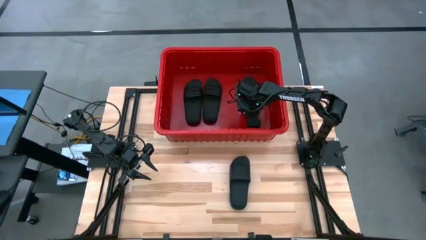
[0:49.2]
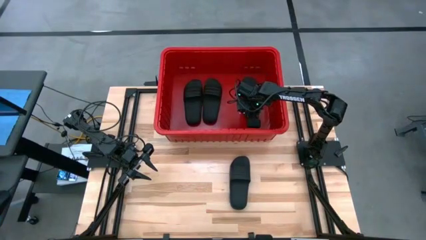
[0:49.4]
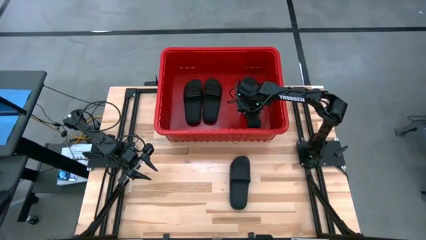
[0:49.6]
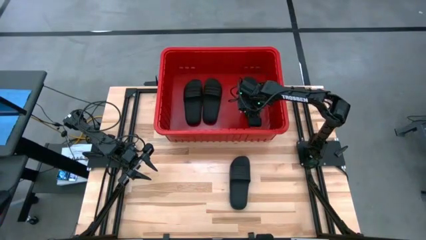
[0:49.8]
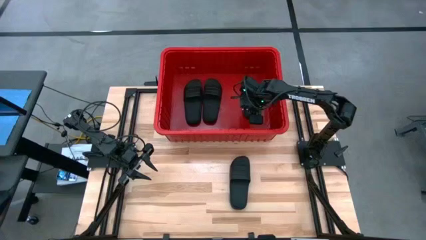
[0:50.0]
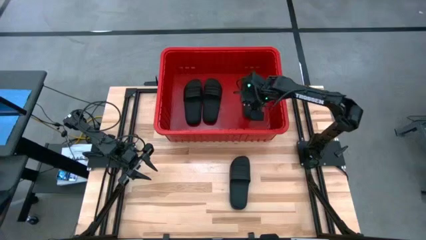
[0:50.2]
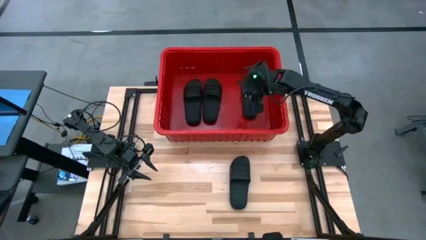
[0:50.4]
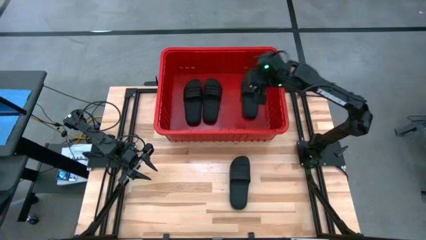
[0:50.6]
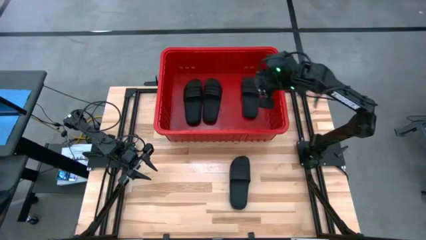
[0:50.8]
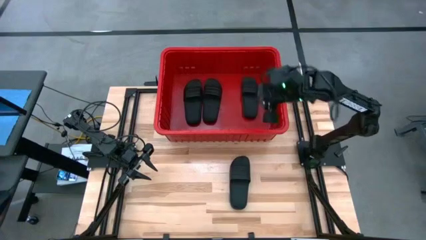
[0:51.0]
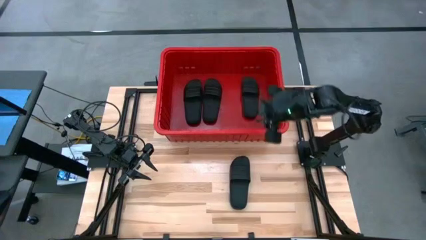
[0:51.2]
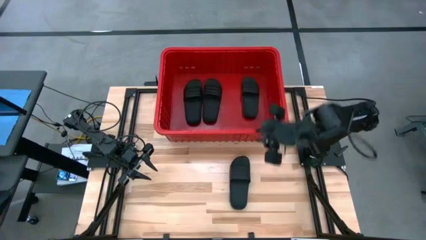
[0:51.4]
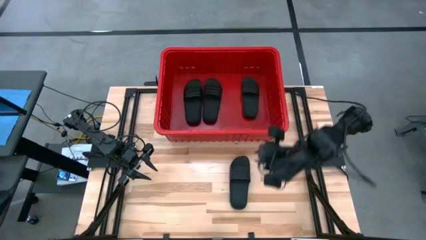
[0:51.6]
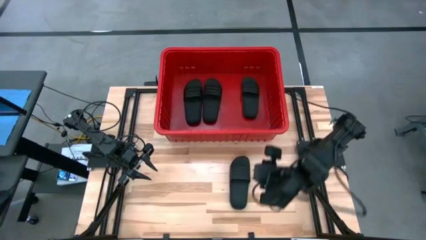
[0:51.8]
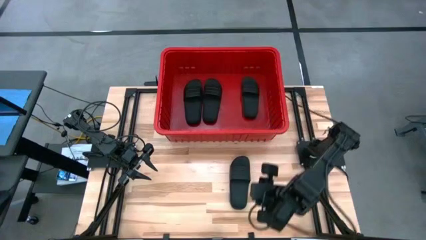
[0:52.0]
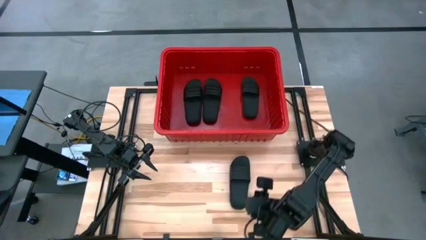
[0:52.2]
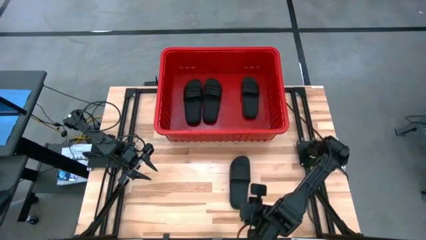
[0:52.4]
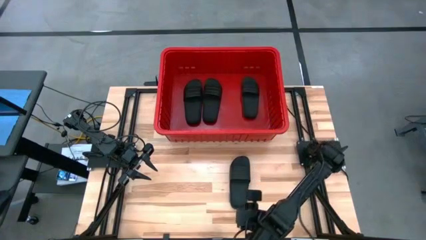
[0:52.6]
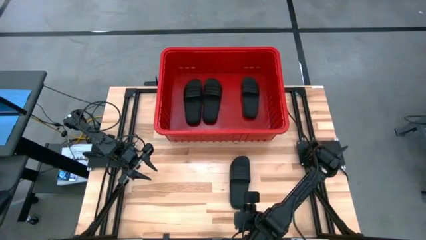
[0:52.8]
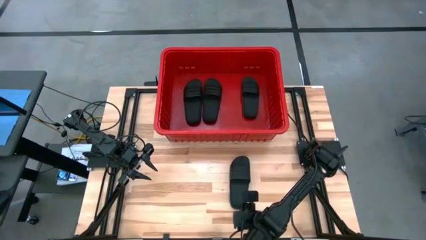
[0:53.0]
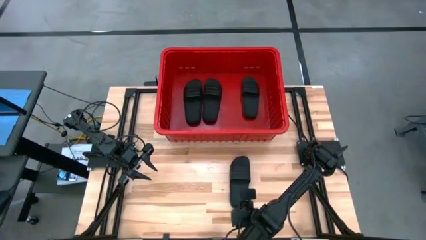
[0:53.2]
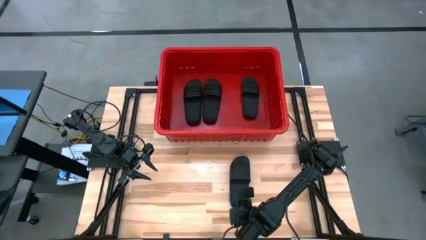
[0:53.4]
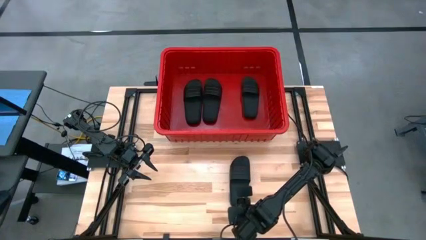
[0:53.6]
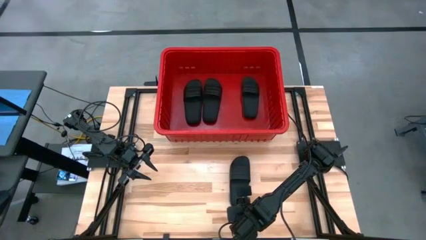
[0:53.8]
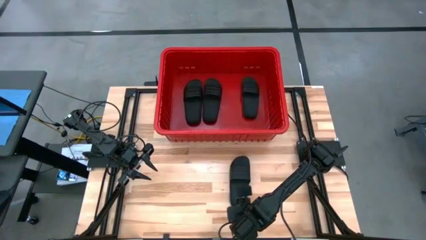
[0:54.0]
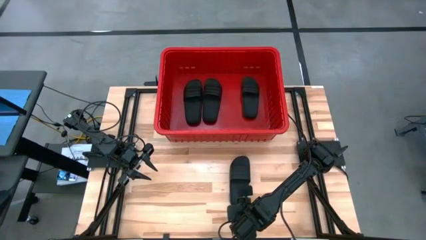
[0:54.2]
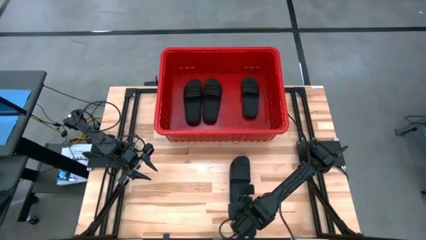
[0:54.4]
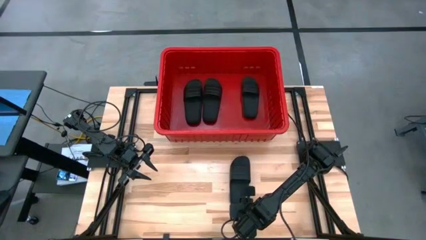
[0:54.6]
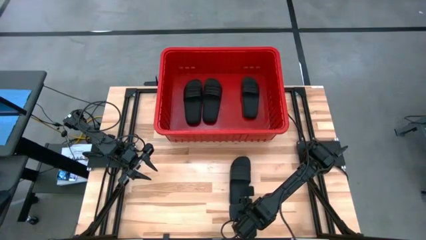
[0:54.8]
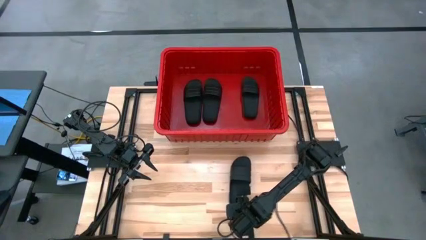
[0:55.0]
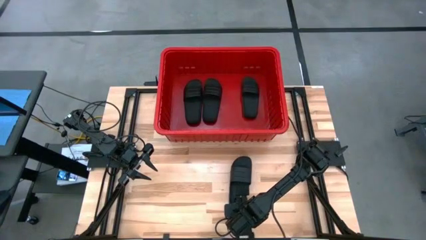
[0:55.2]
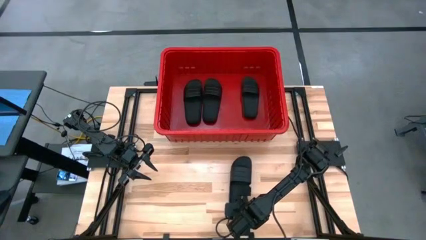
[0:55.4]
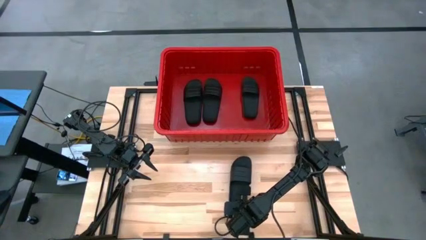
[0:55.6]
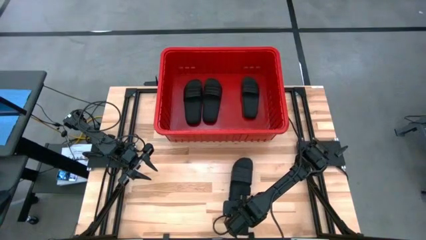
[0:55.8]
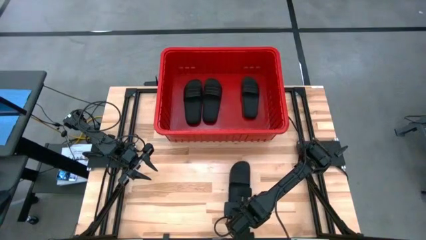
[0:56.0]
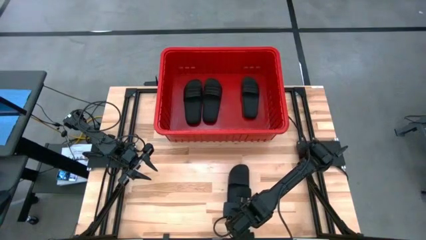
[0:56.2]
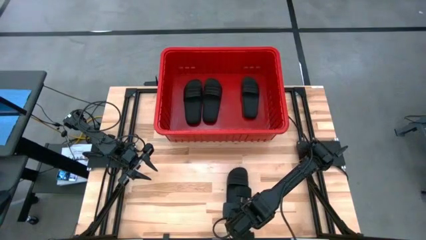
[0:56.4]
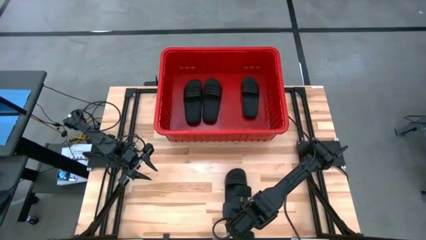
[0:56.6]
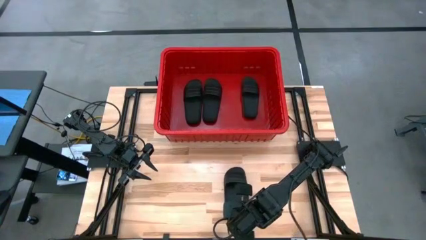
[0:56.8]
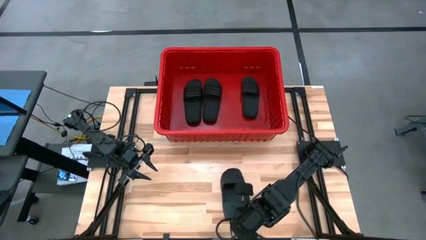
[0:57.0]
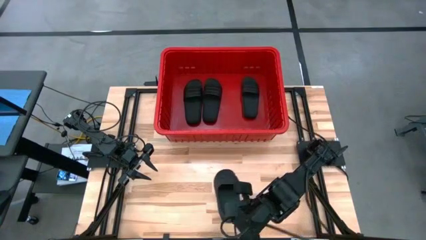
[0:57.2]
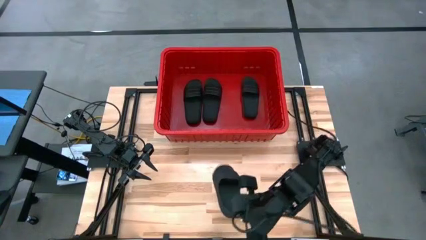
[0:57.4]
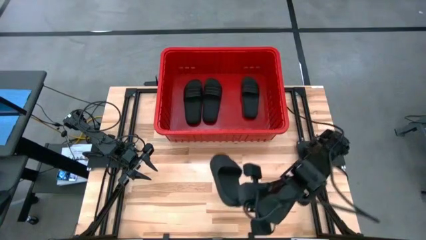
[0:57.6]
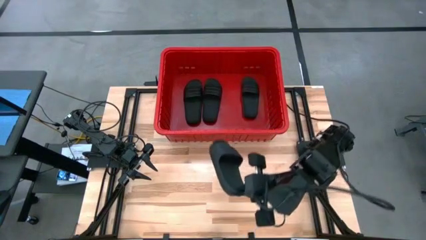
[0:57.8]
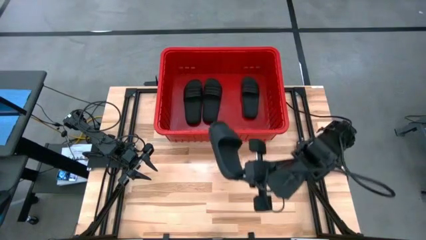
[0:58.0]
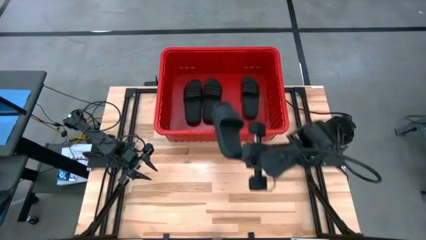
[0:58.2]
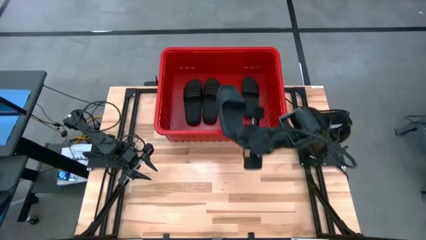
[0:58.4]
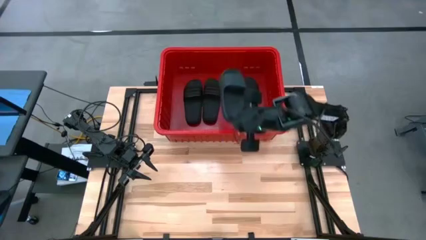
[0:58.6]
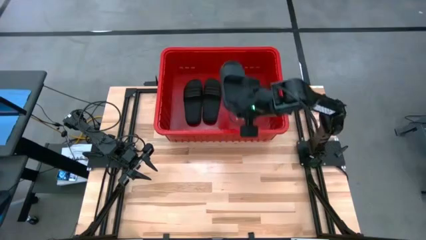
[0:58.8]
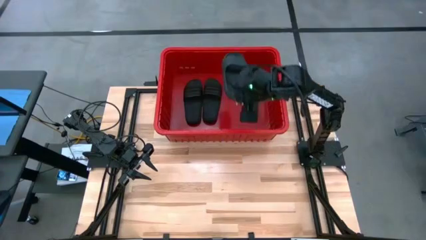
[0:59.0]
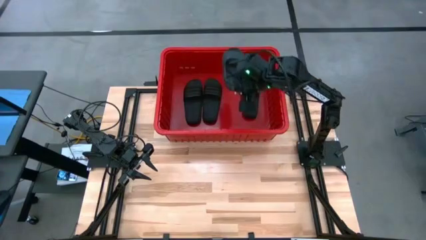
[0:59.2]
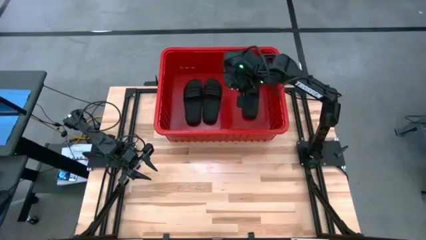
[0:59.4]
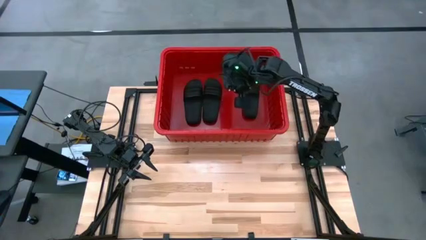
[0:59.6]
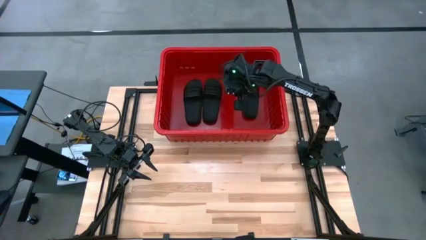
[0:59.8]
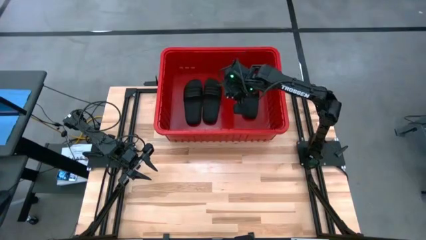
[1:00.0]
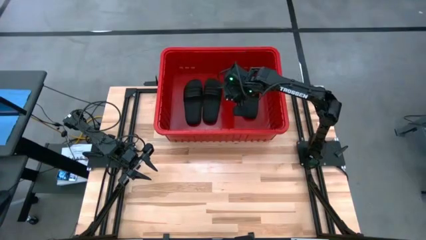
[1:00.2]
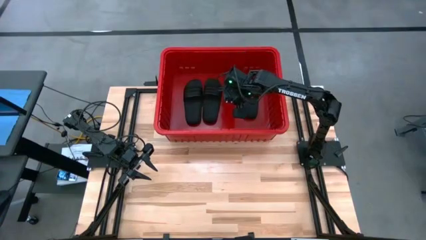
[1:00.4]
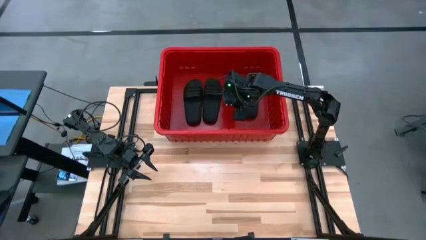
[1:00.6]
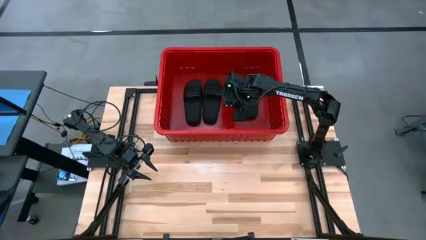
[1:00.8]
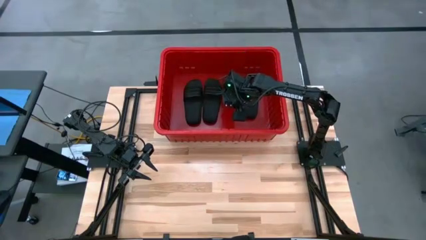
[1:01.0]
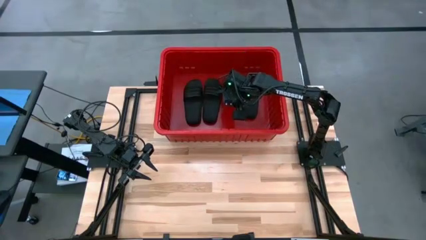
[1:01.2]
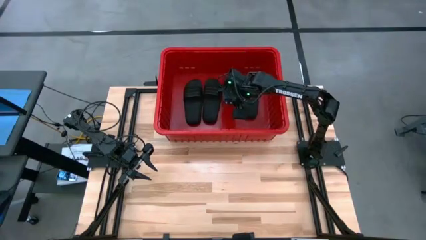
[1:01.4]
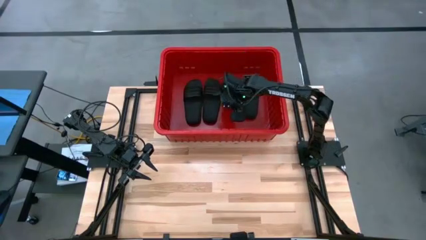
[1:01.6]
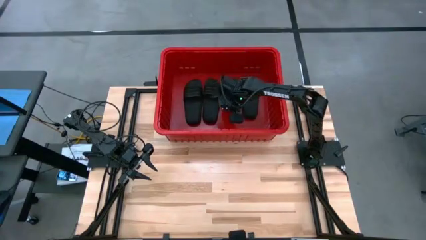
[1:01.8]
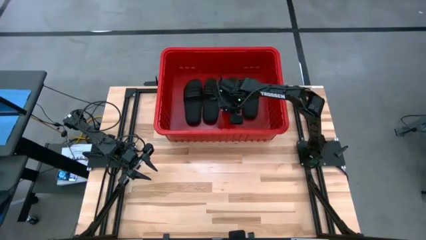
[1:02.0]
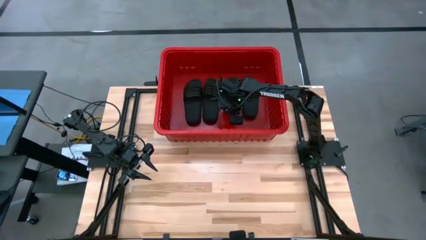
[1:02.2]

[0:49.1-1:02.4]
Task: Pick and place slides into bin
Put the black slide into the red container
